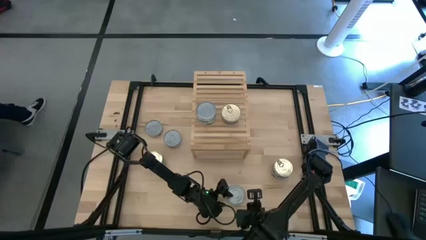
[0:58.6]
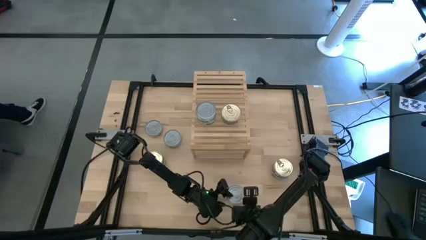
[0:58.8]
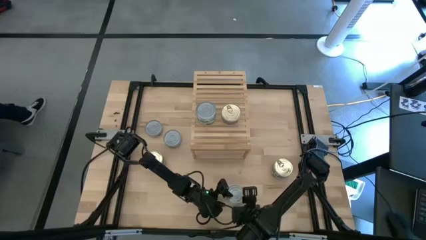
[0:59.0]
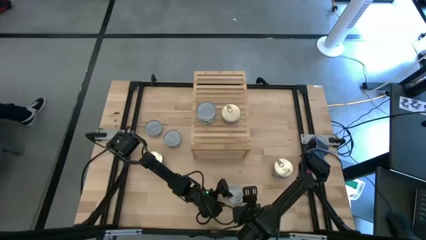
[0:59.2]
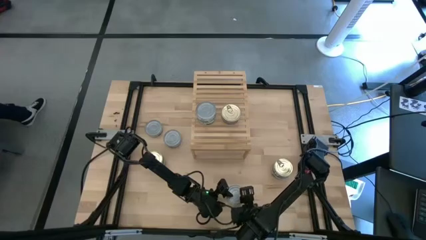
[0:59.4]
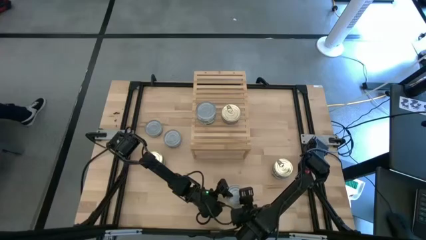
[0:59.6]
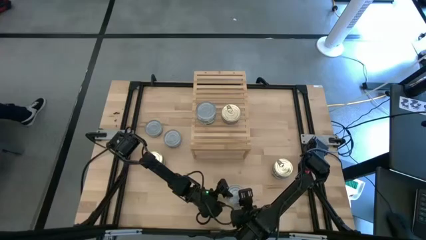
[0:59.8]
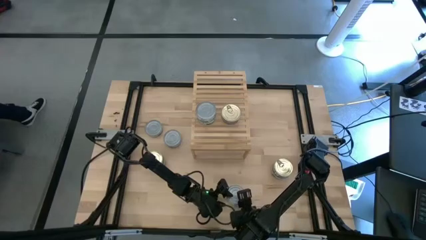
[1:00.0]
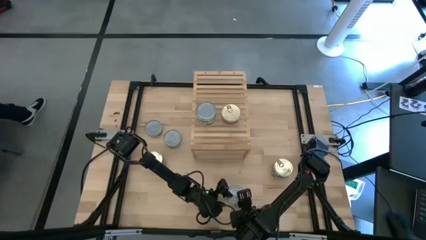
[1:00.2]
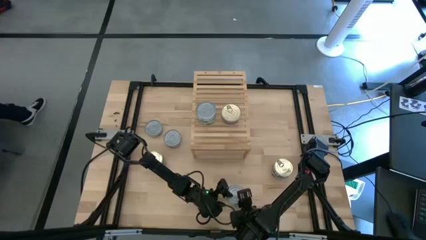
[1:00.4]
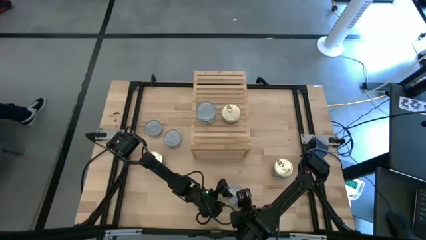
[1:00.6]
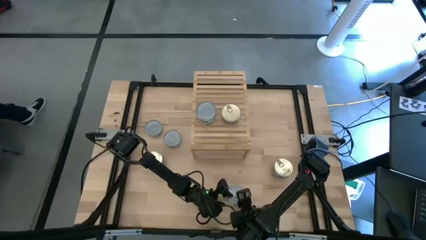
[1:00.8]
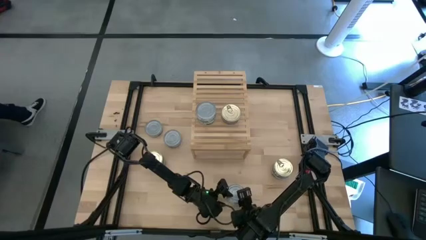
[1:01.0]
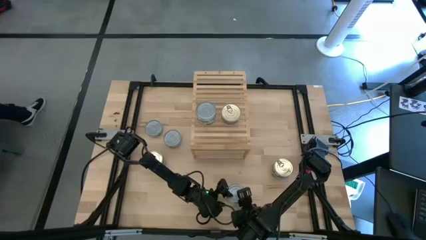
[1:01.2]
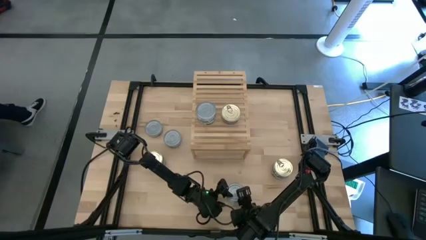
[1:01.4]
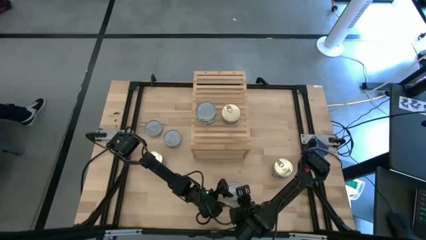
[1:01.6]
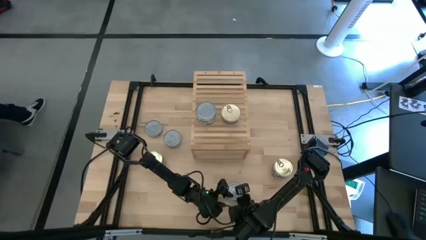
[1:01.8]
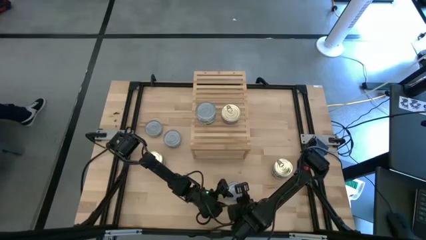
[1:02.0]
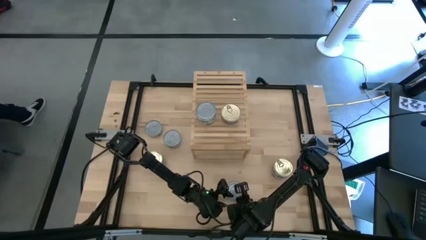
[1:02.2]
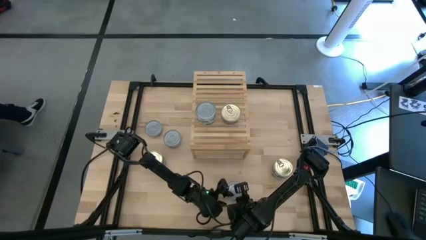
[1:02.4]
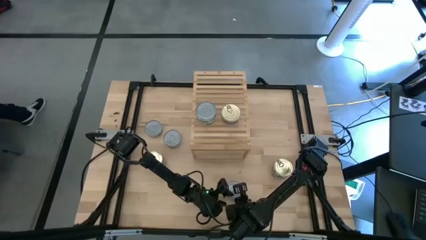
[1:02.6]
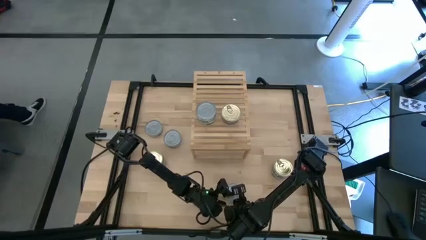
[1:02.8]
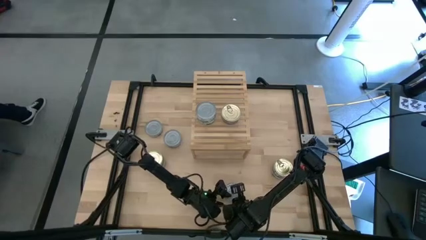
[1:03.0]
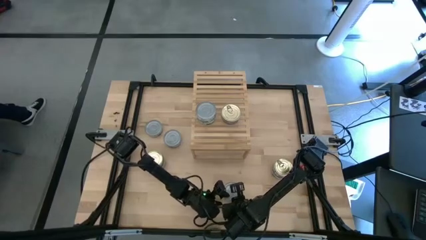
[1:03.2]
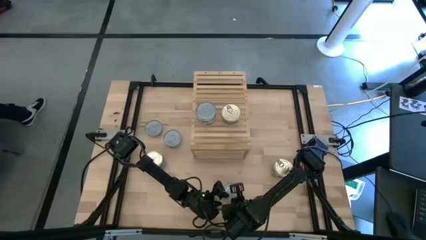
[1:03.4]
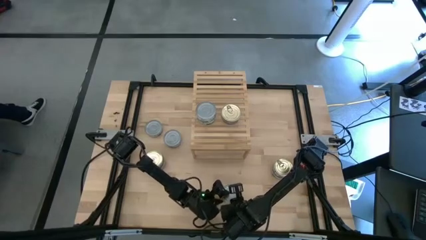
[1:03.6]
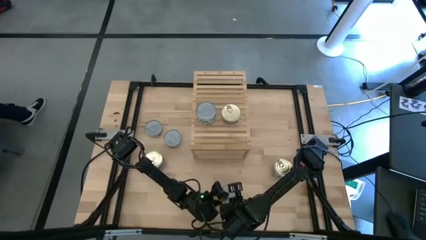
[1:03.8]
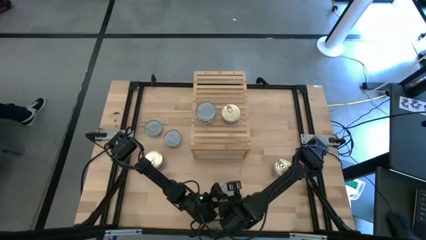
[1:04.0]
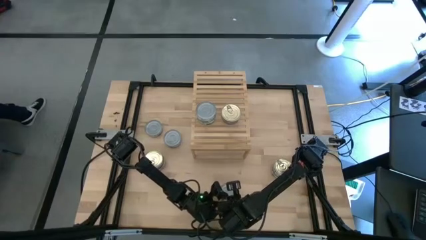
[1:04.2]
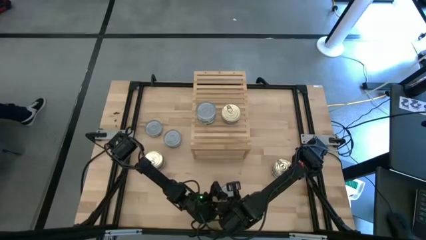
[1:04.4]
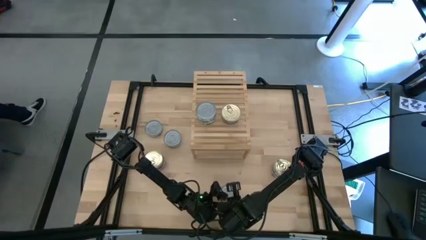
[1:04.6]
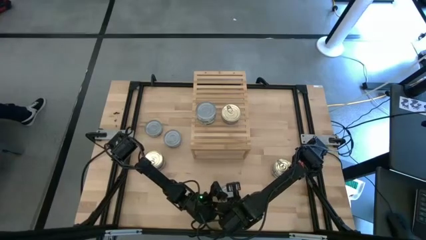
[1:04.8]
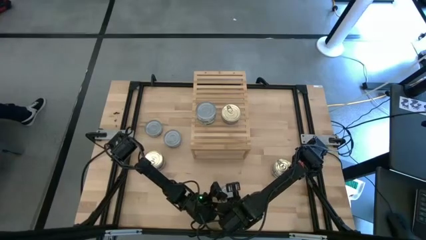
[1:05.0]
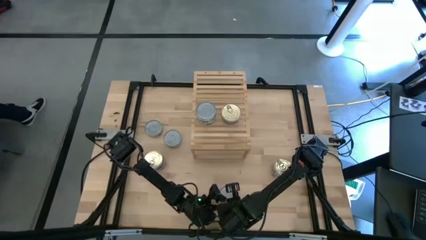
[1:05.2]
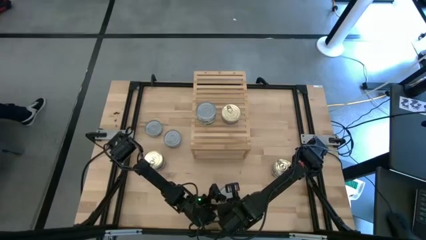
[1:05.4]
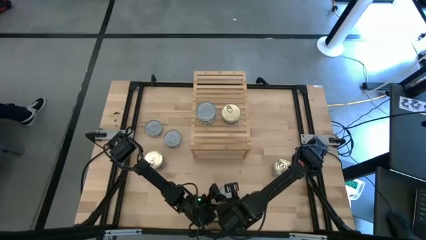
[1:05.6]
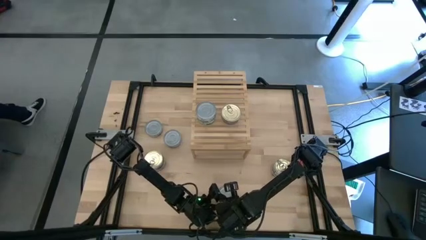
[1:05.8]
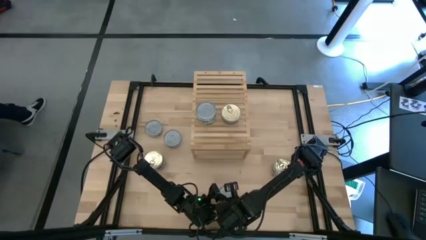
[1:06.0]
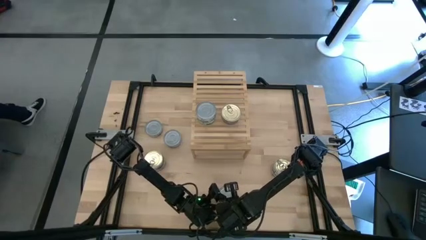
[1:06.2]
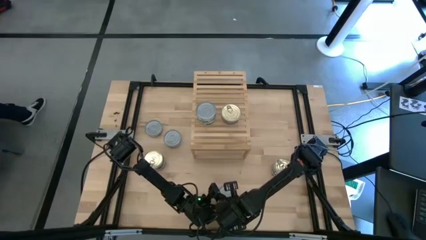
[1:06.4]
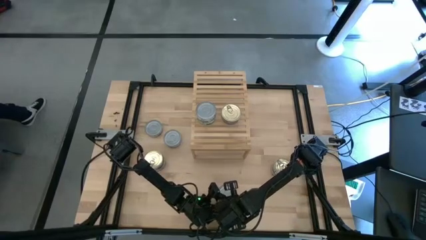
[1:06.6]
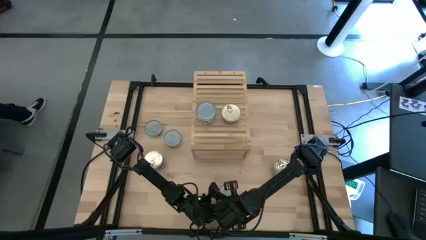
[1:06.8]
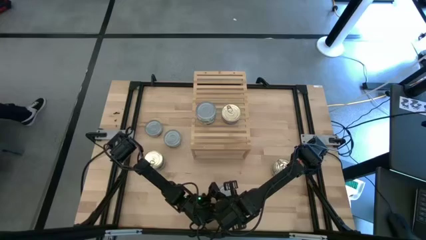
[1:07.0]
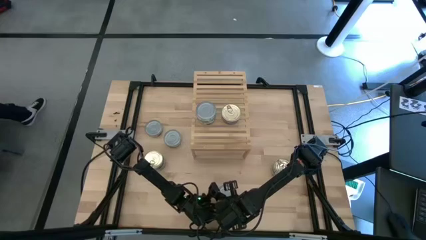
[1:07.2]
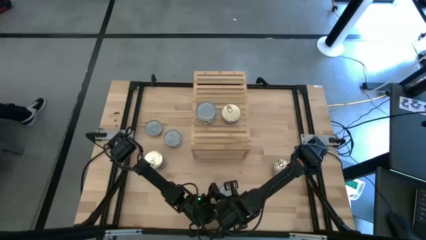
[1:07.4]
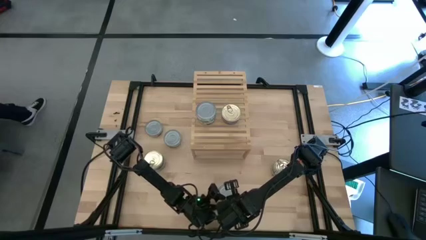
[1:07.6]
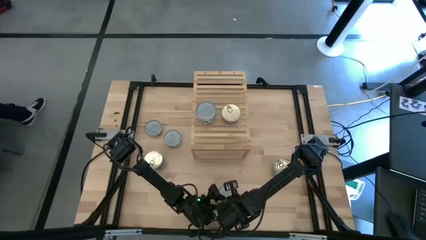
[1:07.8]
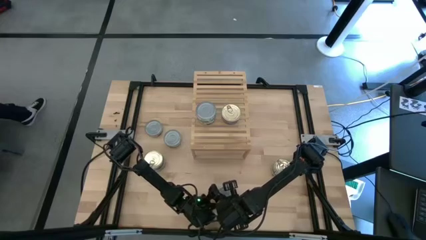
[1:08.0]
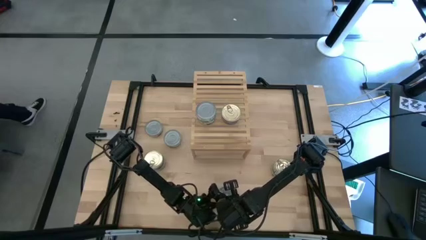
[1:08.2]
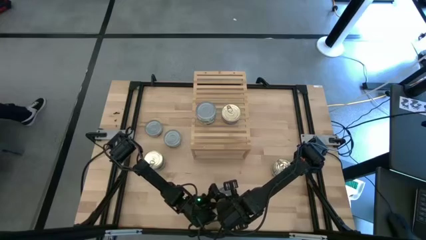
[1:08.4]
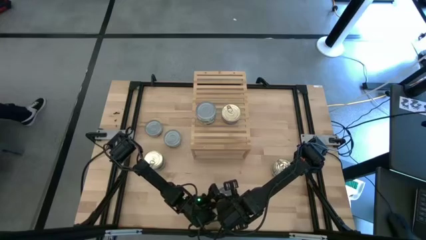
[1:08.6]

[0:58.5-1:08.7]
Task: Stack canned seafood by type on shelf
Stack the green tuna can on top of the green tuna can on the shelf

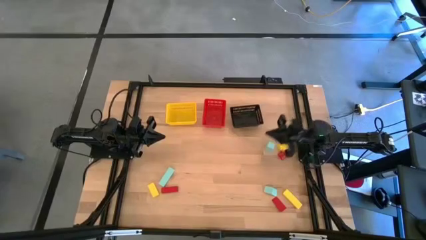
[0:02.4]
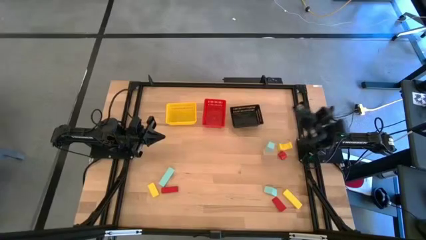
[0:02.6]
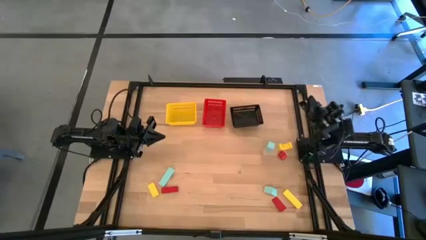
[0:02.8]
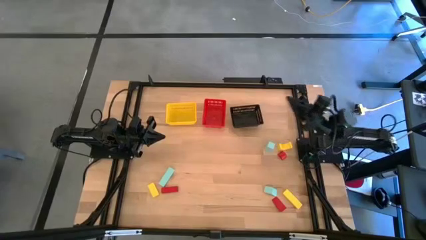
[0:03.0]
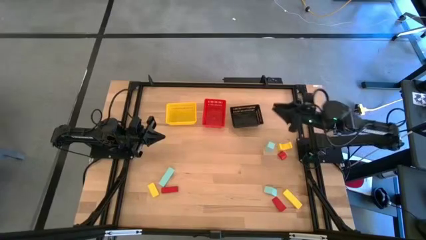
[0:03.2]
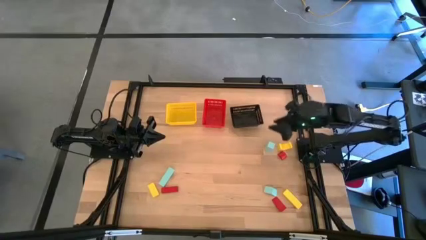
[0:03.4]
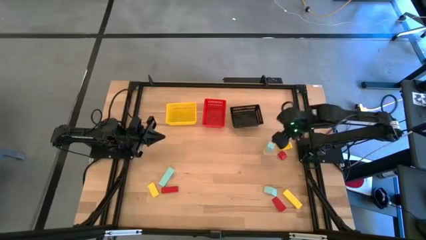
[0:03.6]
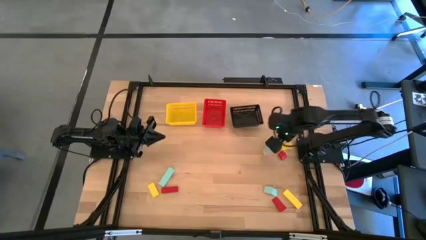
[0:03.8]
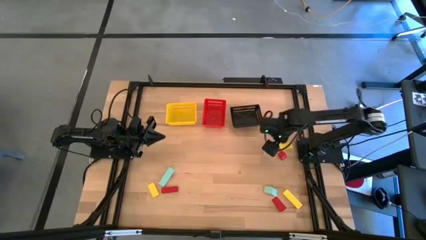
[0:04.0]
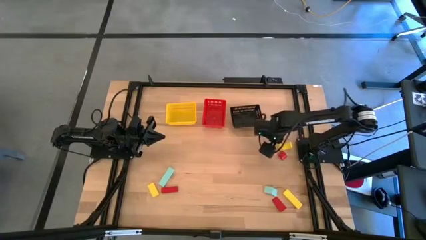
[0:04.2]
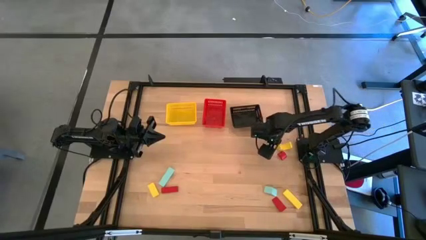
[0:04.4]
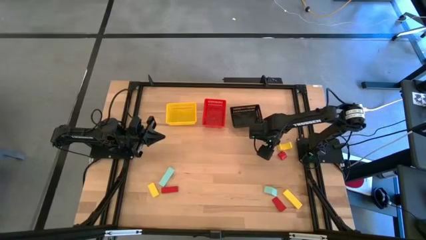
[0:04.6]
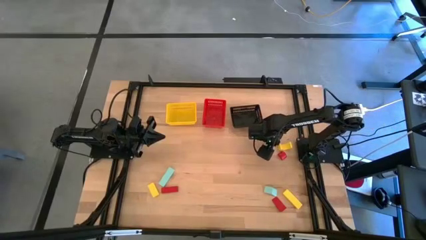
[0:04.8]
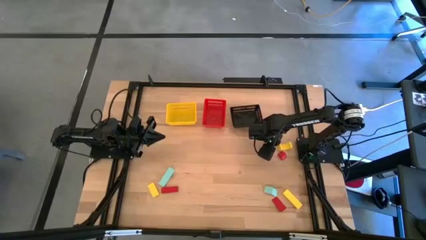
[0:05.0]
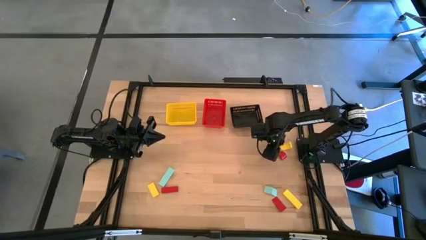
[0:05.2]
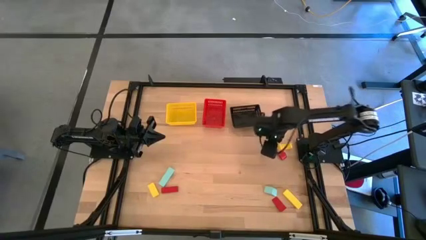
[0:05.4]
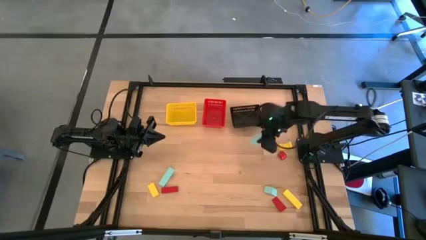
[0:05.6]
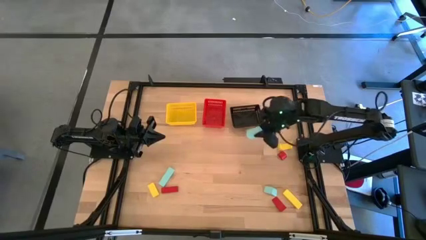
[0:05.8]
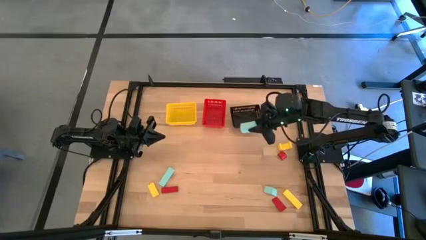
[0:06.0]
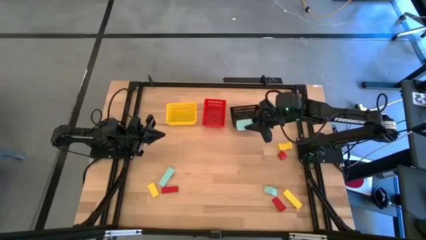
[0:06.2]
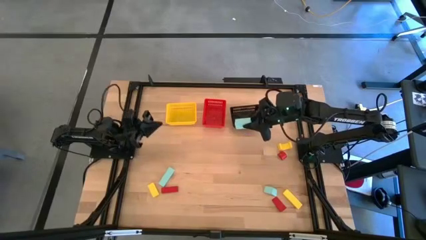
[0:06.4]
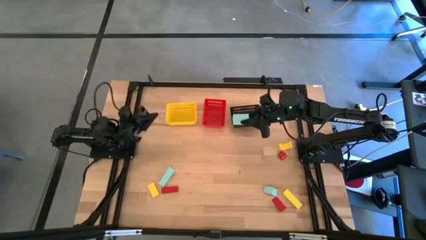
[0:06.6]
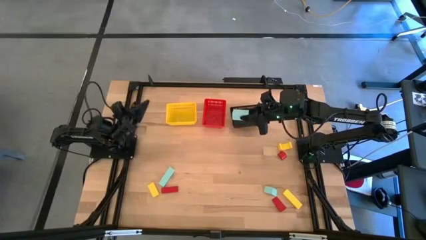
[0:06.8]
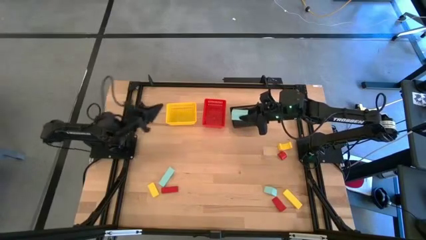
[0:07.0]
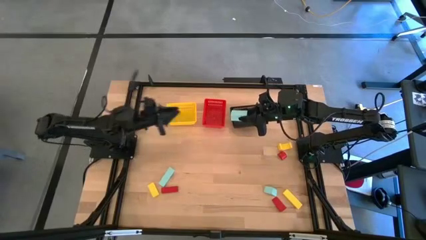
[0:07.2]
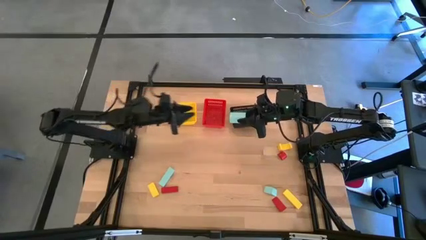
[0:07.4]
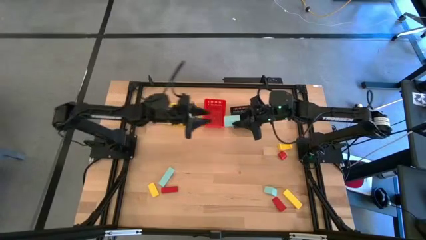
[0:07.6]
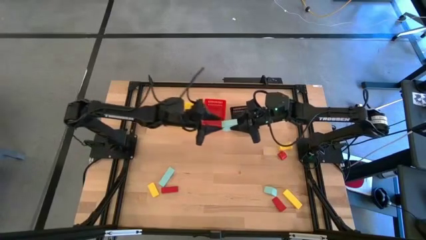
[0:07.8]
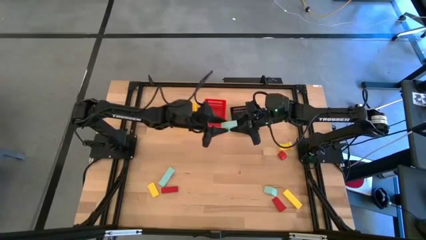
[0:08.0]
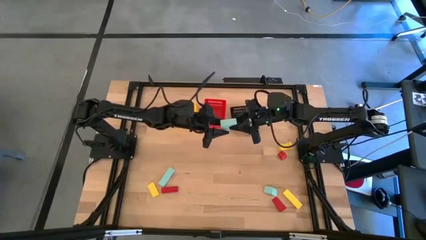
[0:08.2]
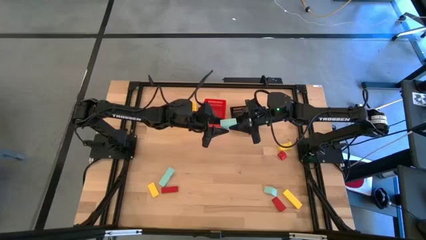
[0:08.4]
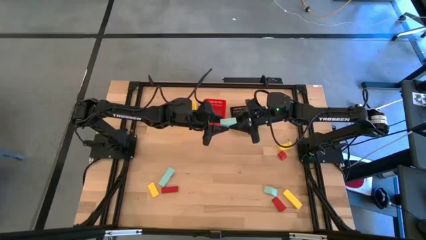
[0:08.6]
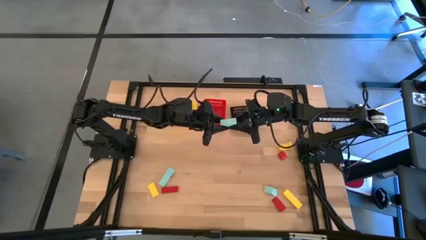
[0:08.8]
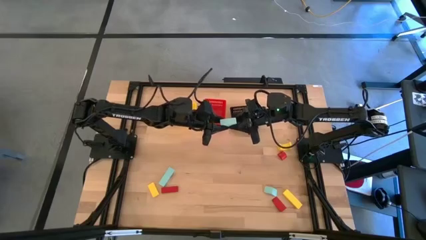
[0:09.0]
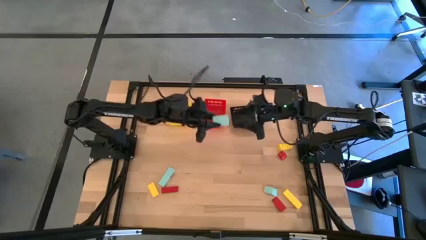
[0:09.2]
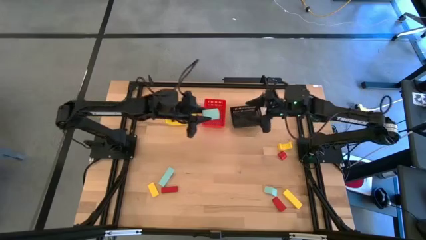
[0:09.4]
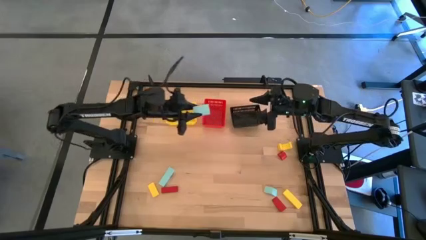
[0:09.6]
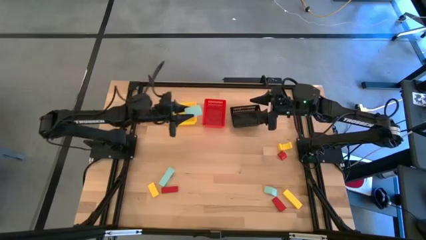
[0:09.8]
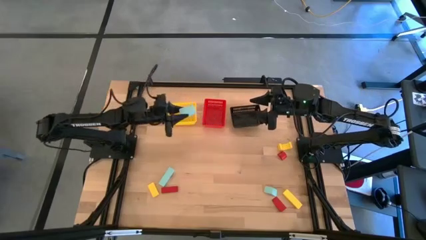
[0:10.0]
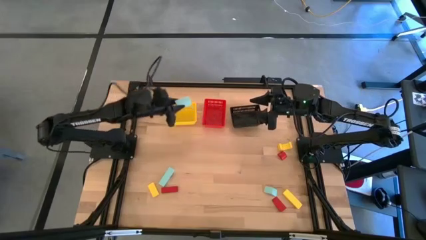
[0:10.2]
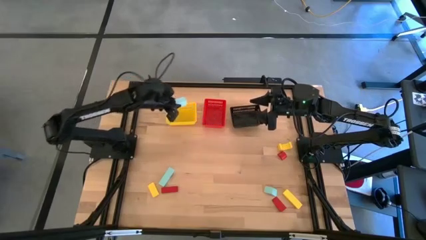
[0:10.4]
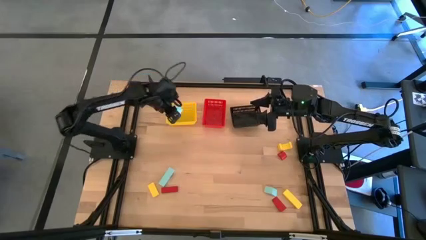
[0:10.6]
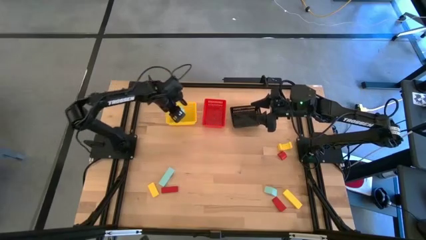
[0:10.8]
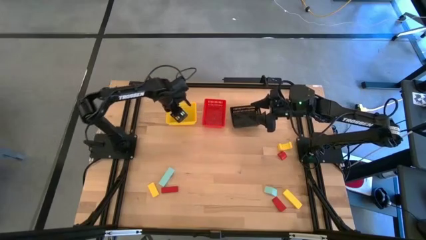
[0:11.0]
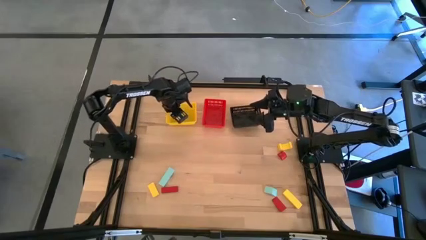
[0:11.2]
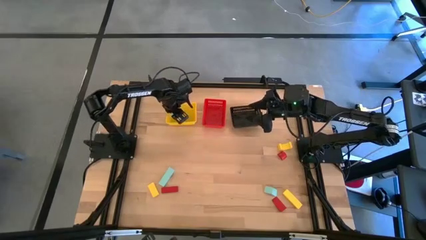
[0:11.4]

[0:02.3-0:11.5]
Task: Sort & place blocks by color
Put the top light blue block into the yellow basket
